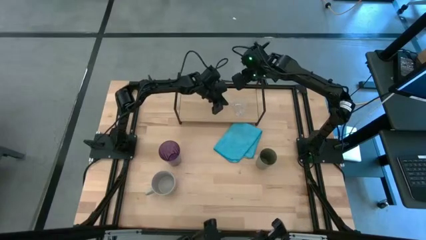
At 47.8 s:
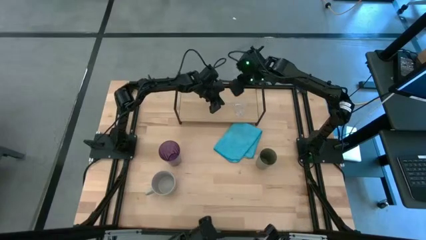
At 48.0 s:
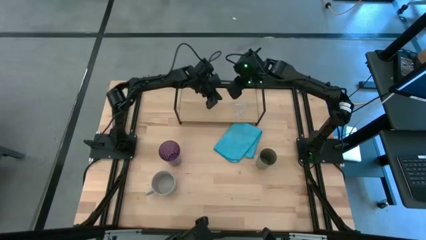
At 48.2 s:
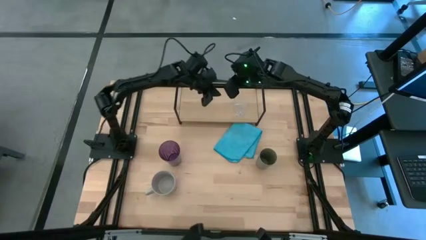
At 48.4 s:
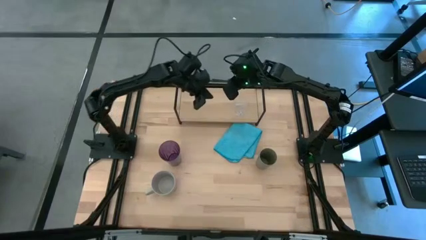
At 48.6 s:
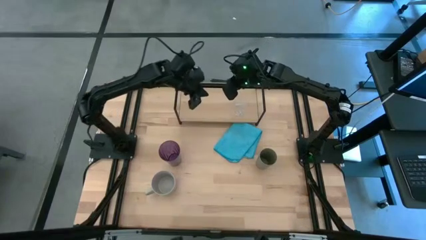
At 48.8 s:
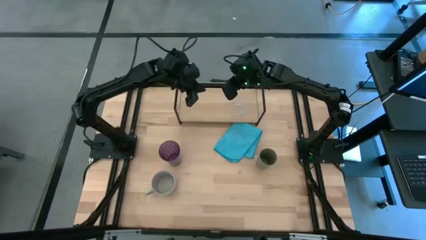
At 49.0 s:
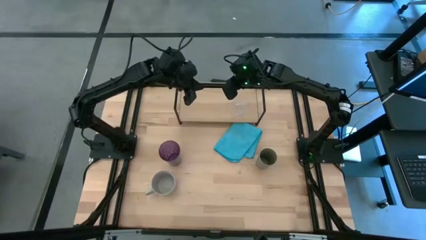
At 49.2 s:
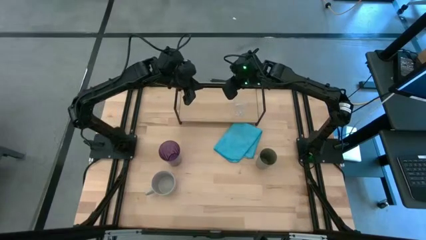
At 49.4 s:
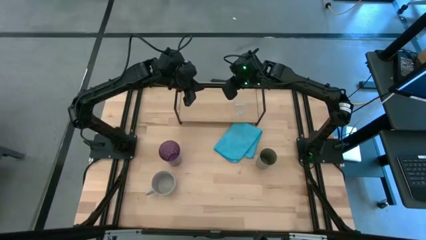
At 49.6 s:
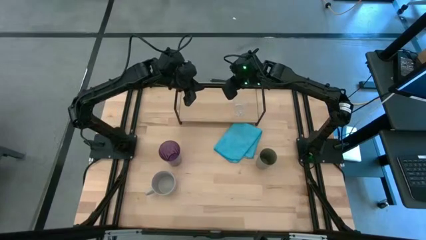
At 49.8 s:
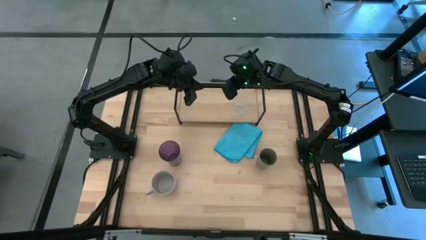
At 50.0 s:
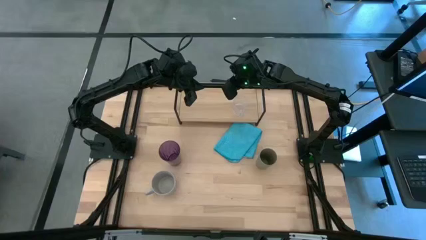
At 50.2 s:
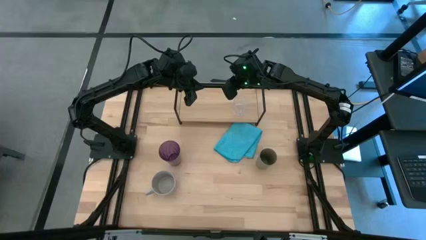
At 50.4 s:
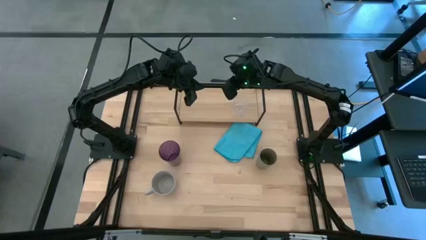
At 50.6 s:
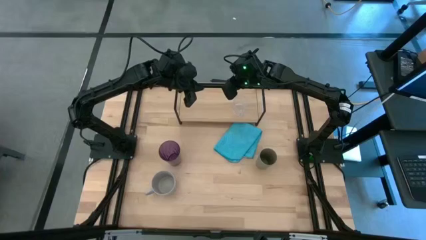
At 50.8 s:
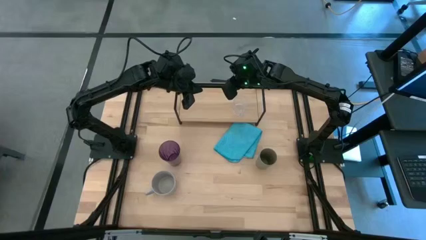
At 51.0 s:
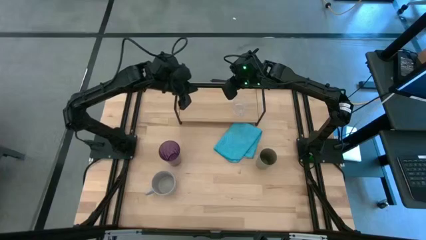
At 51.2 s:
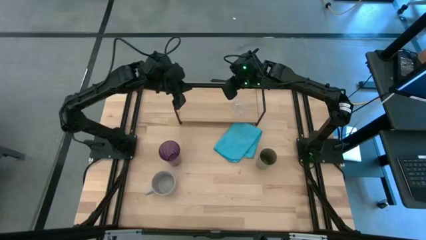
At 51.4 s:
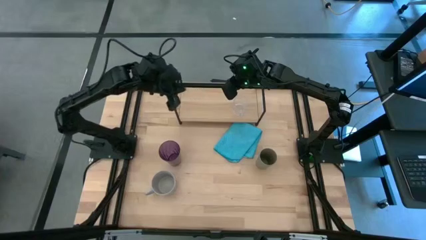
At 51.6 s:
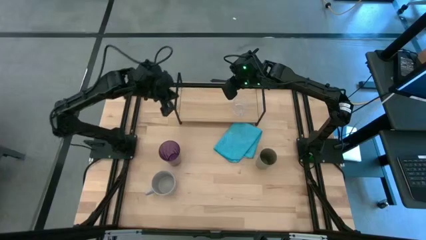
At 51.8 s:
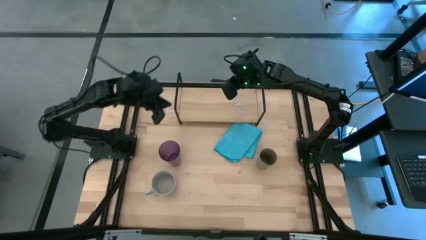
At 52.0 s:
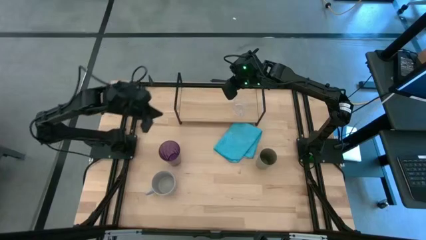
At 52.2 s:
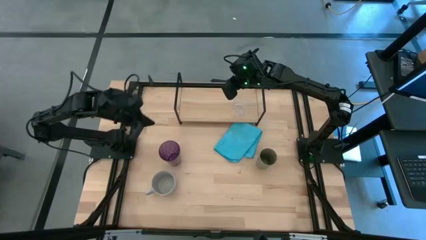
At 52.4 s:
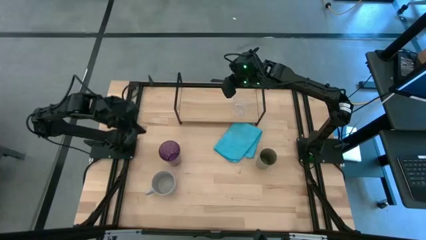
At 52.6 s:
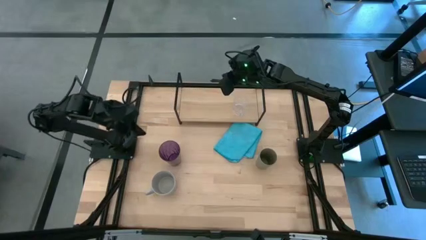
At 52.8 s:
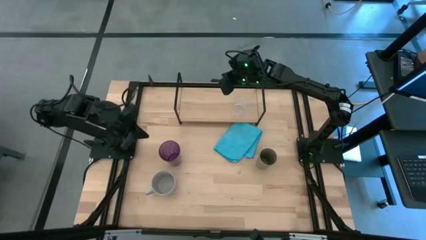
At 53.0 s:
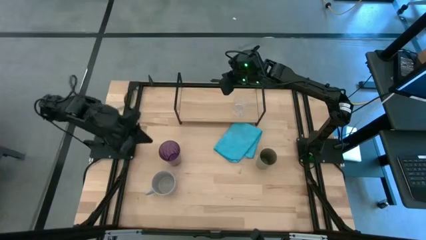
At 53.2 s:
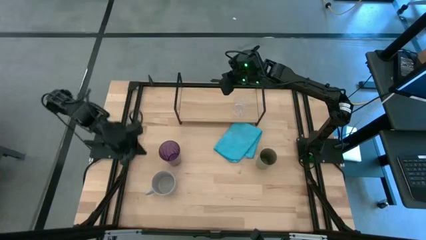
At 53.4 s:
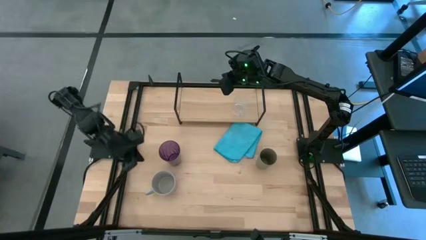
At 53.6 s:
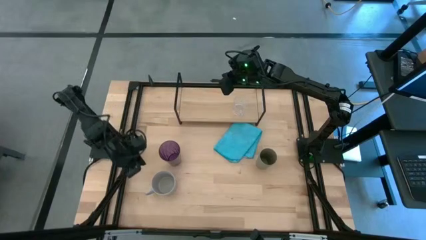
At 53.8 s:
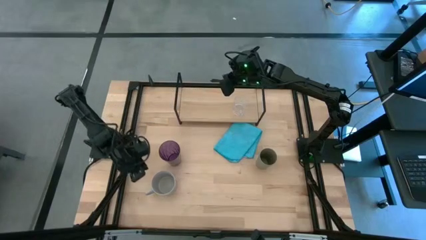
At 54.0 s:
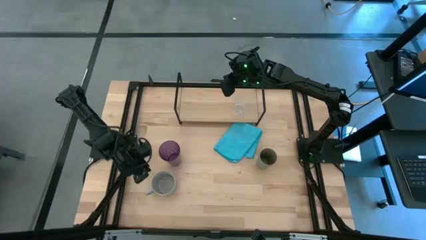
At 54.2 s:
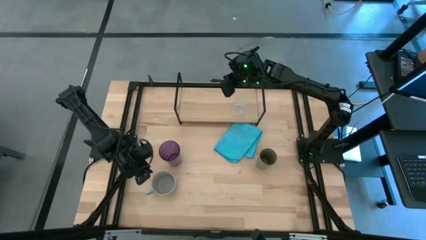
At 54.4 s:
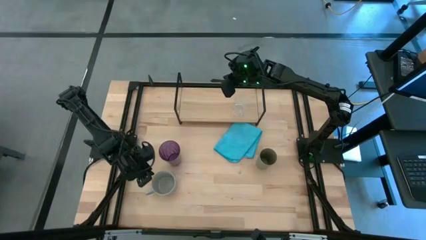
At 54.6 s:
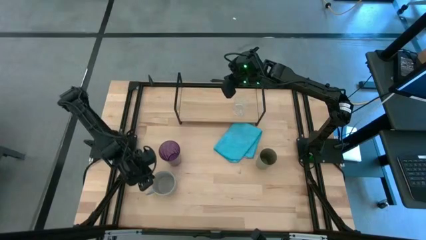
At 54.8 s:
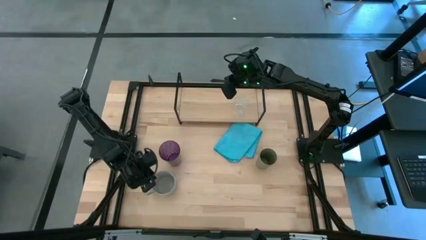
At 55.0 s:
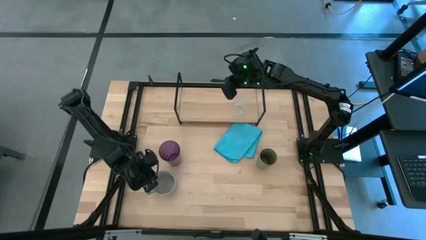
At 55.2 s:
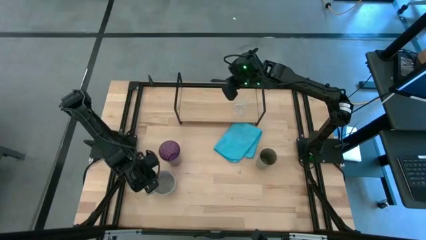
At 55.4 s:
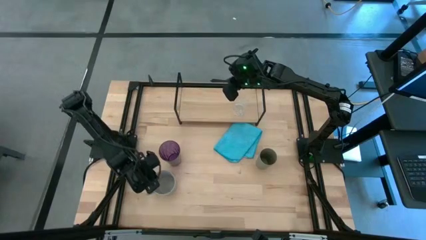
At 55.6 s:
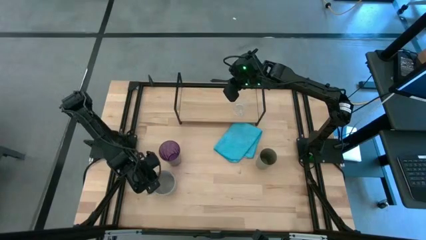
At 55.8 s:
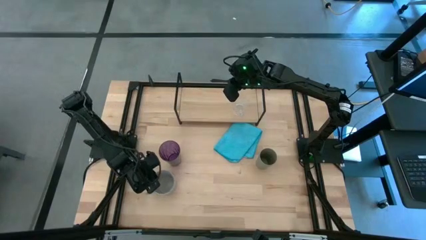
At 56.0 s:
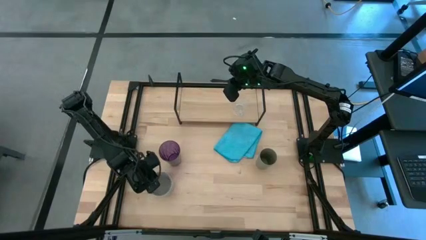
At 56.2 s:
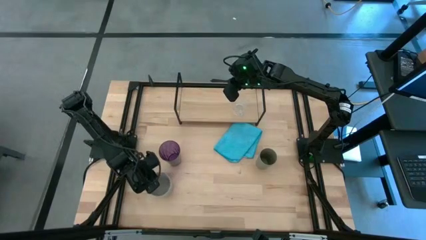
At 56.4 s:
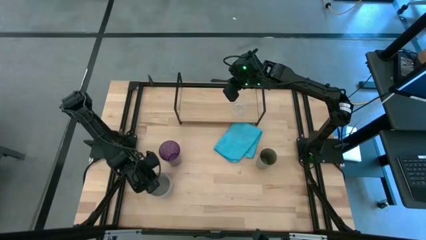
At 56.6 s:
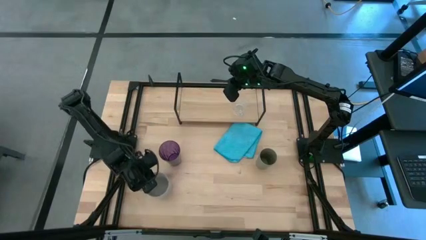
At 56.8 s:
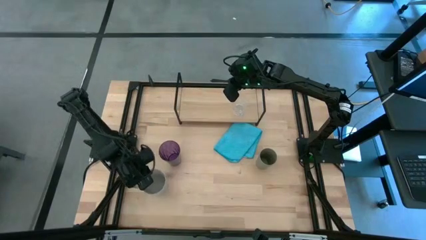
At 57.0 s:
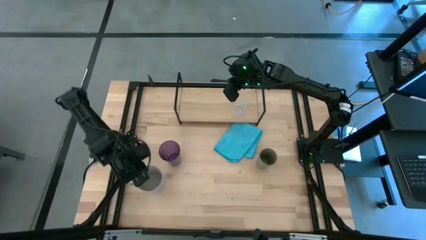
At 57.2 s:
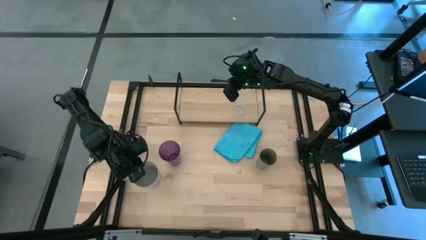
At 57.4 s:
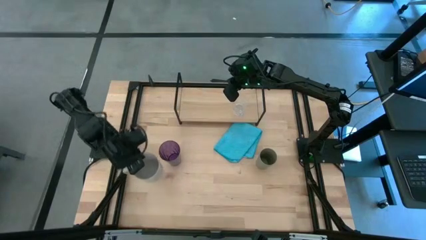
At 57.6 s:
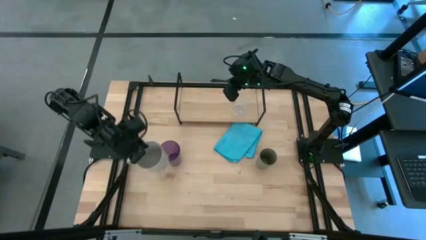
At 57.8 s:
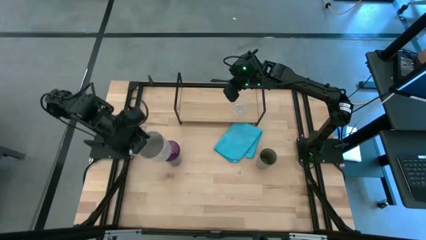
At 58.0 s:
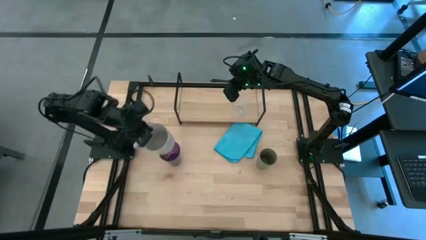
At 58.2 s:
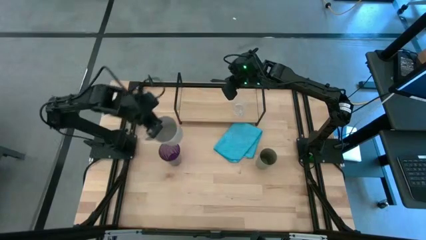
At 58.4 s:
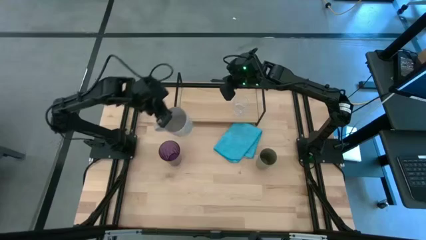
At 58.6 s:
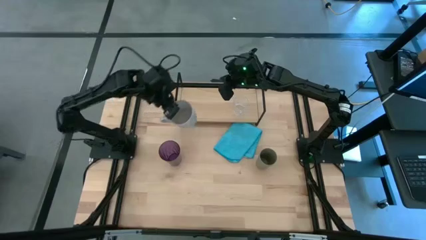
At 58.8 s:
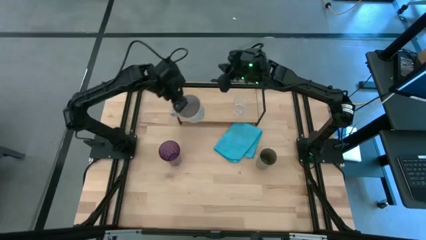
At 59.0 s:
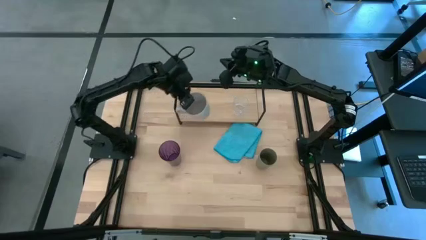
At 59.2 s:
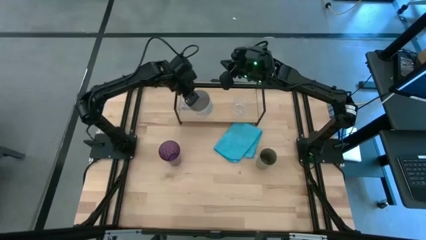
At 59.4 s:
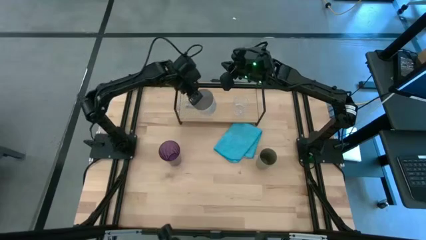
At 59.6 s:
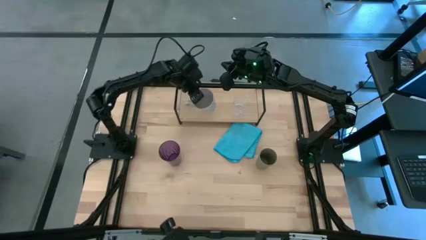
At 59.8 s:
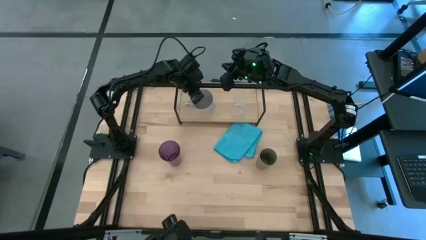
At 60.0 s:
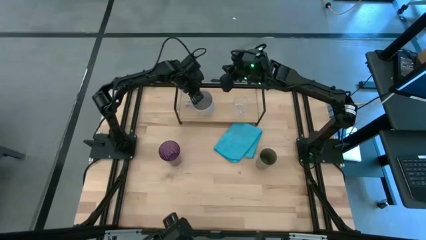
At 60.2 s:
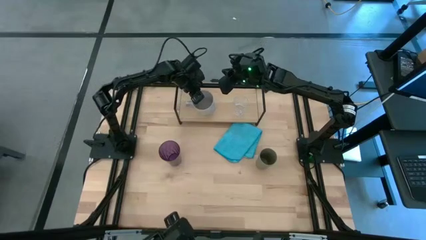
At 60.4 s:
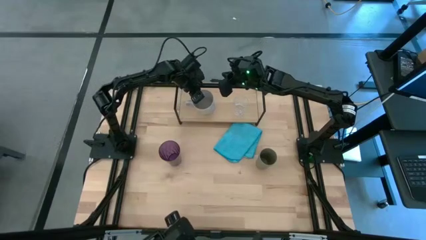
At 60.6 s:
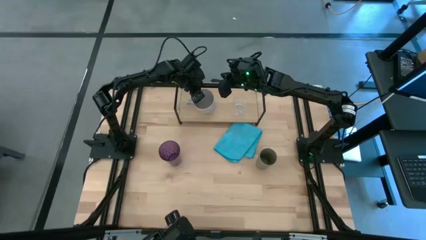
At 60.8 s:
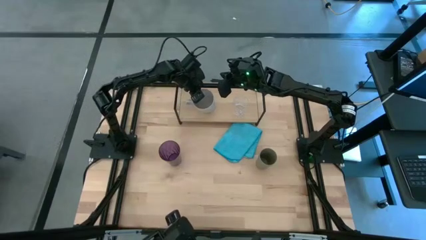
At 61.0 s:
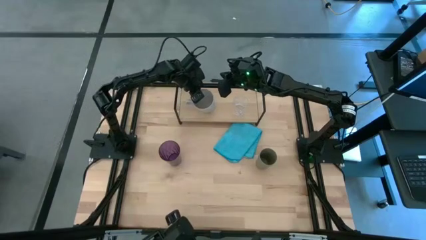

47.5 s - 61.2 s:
Task: Stack small to large cups/mugs on shelf
Put the gray mug on the shelf
